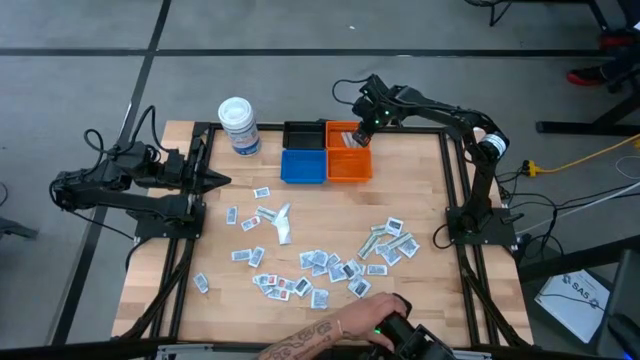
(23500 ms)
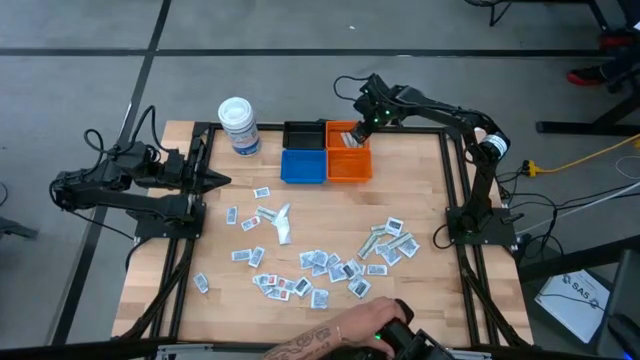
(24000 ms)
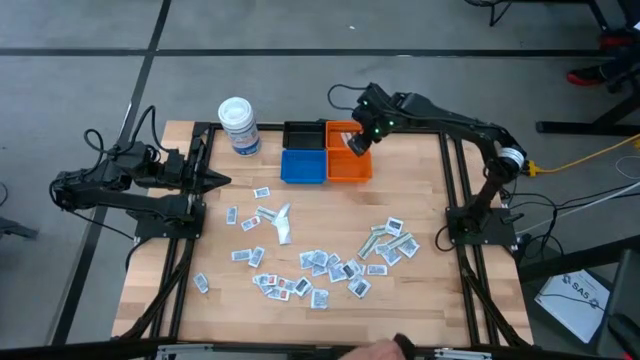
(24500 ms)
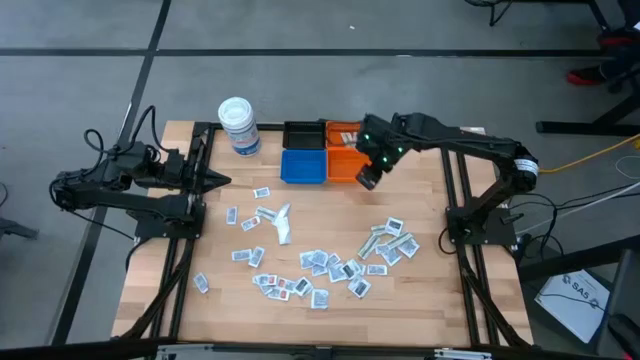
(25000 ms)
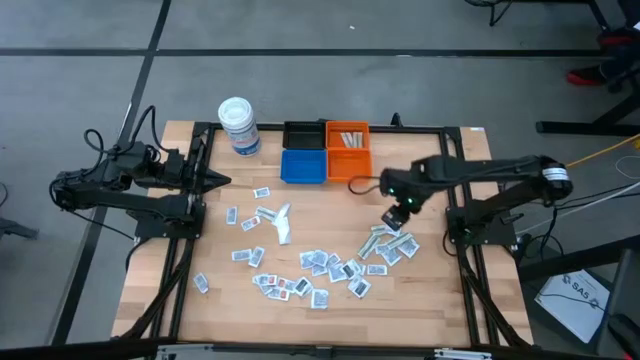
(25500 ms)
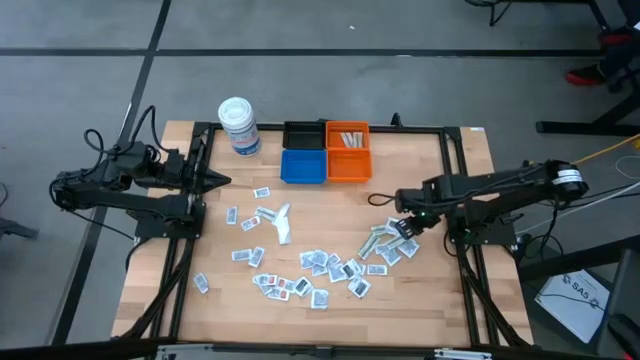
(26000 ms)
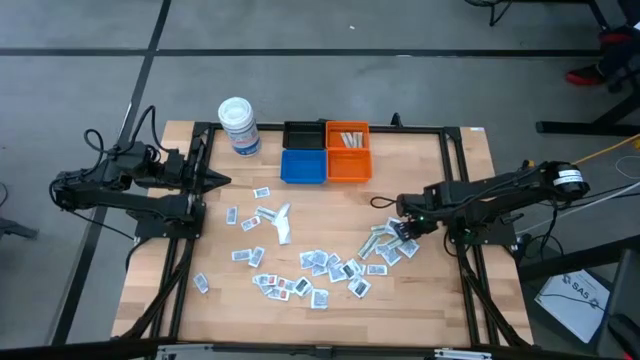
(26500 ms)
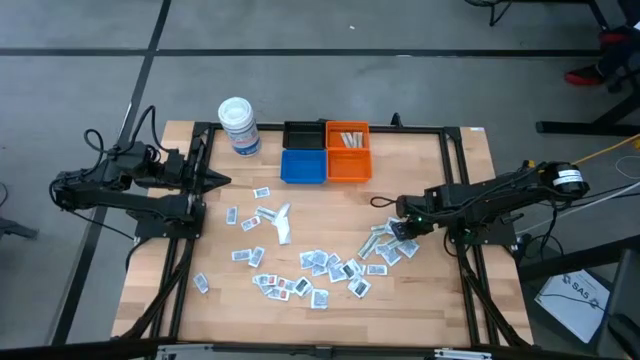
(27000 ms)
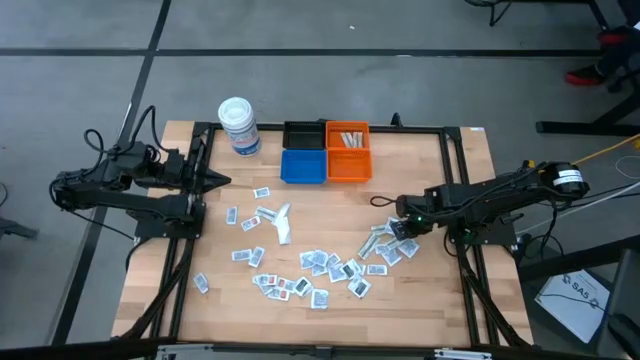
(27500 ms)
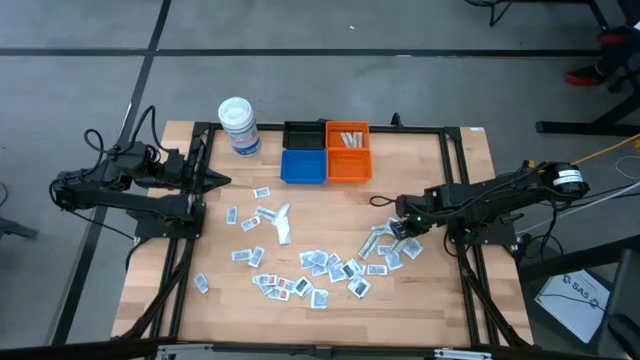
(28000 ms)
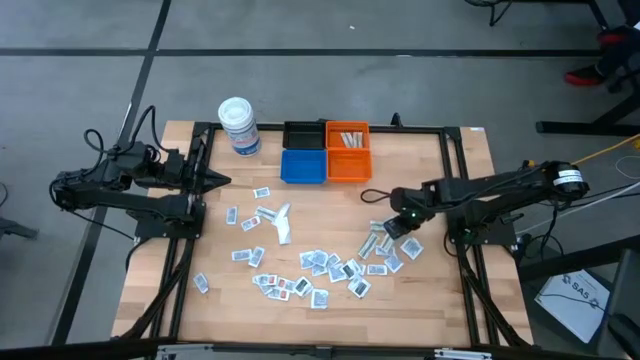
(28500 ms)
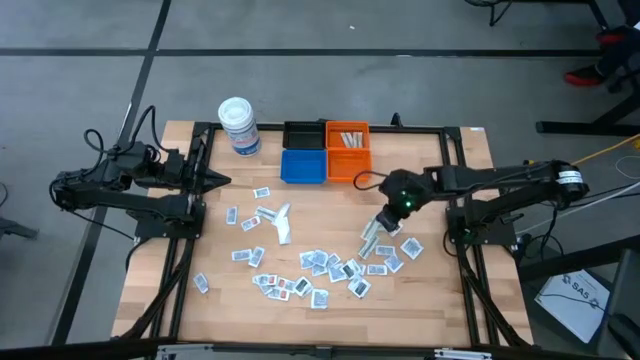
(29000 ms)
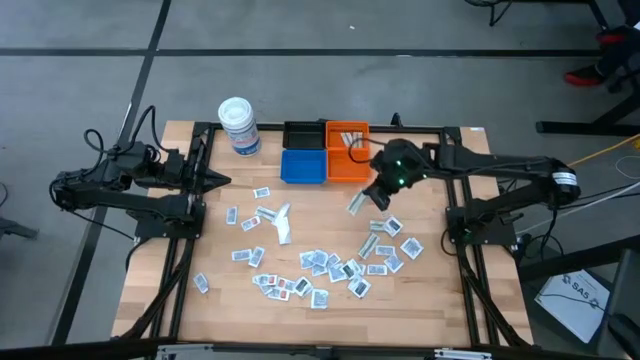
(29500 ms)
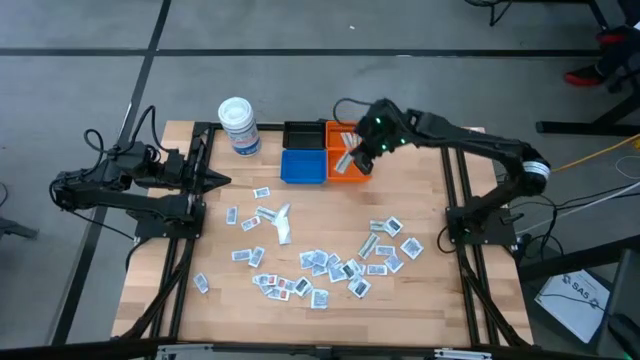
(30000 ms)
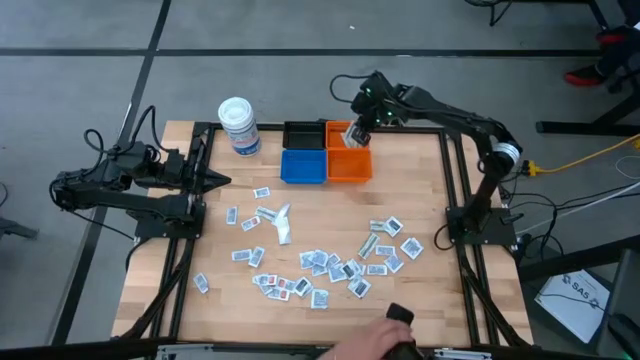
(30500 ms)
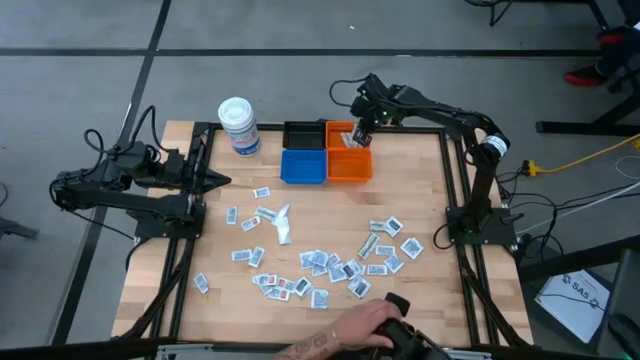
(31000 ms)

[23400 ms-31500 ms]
Task: Pick & Place First Aid Supplies
Put the bandage pack into the top orange bin

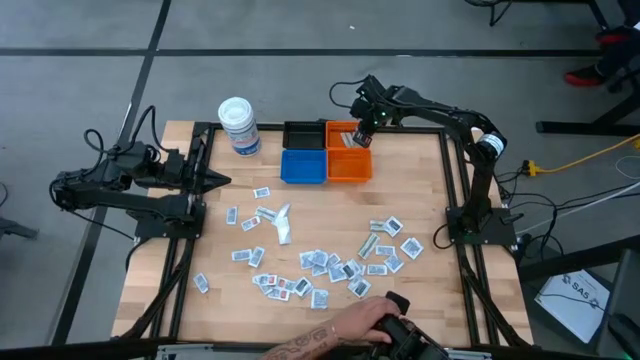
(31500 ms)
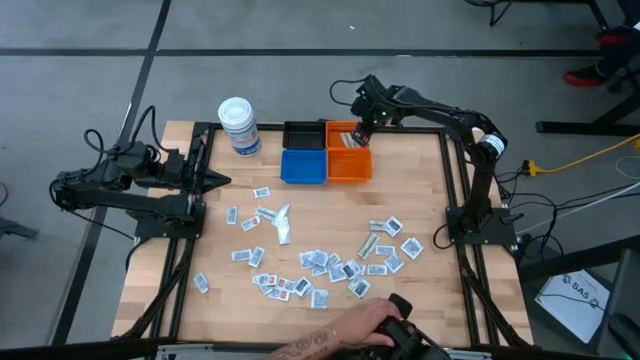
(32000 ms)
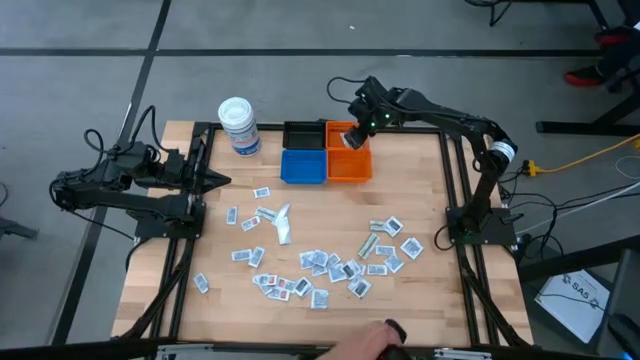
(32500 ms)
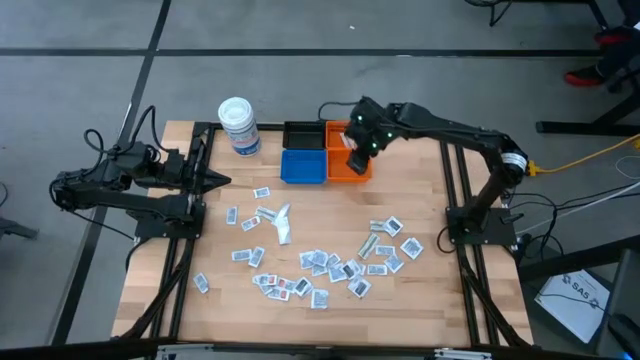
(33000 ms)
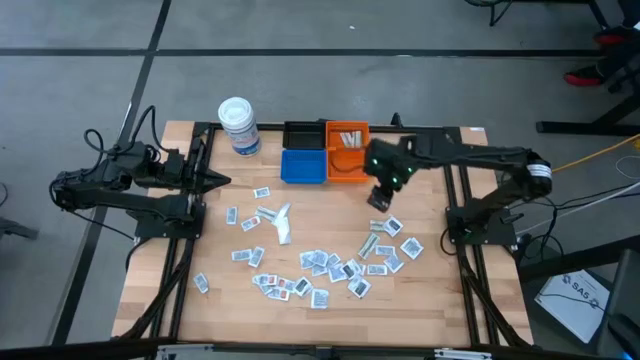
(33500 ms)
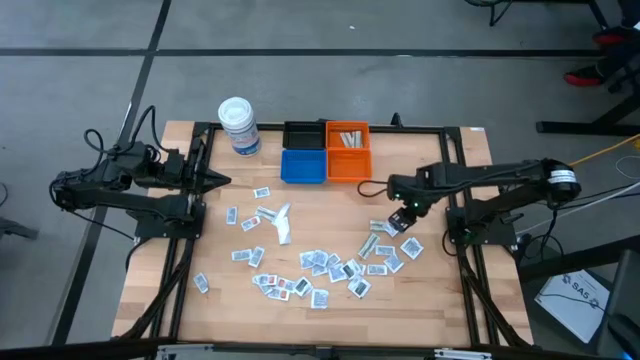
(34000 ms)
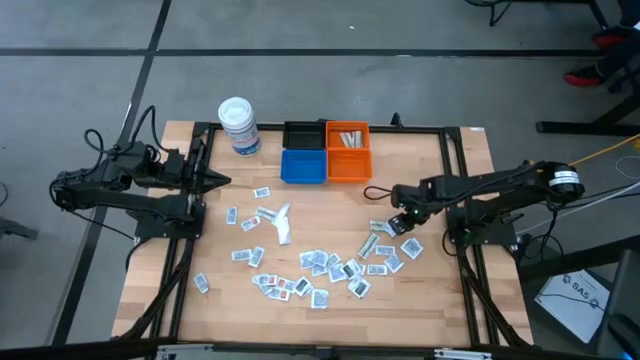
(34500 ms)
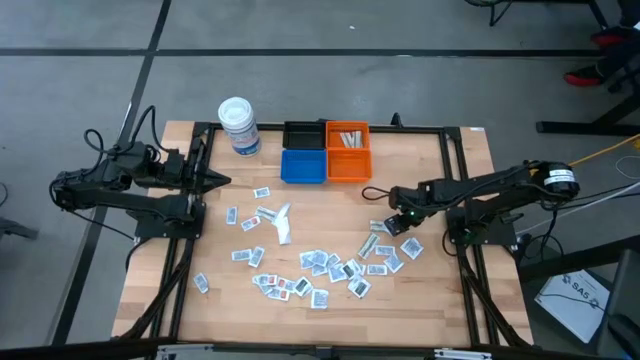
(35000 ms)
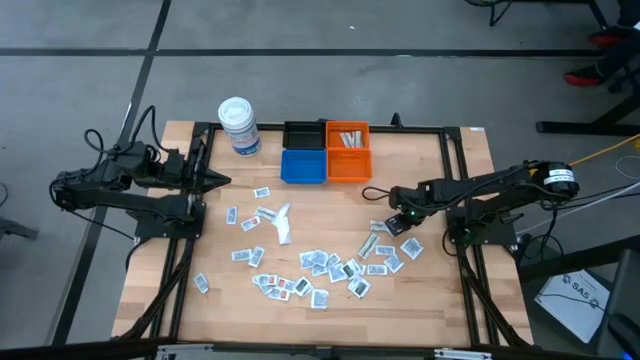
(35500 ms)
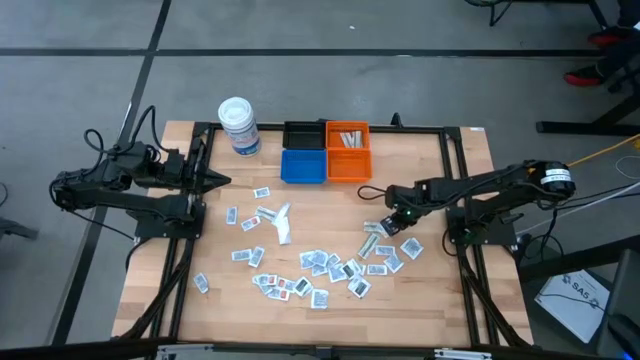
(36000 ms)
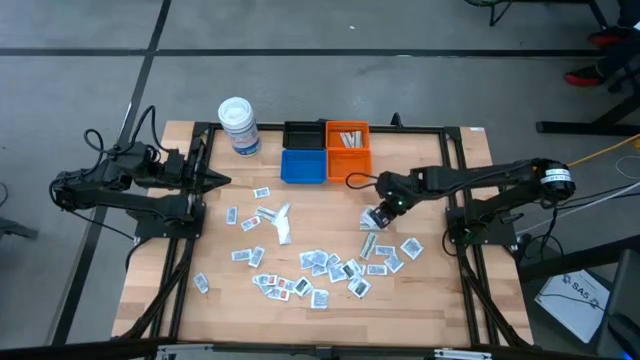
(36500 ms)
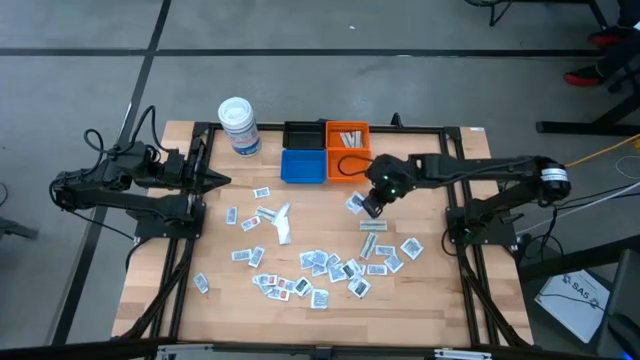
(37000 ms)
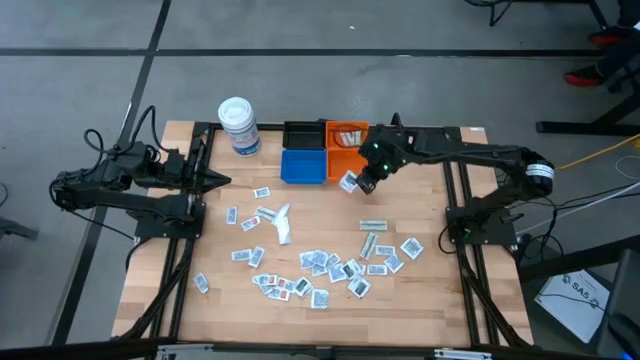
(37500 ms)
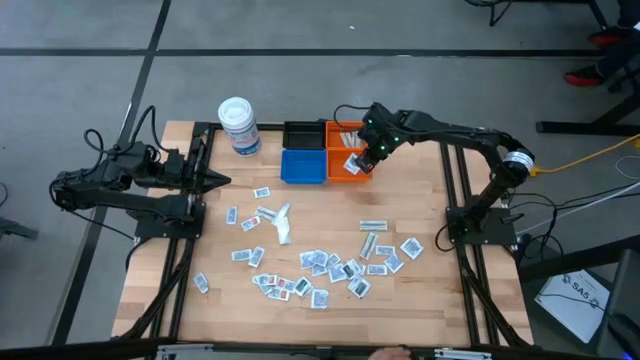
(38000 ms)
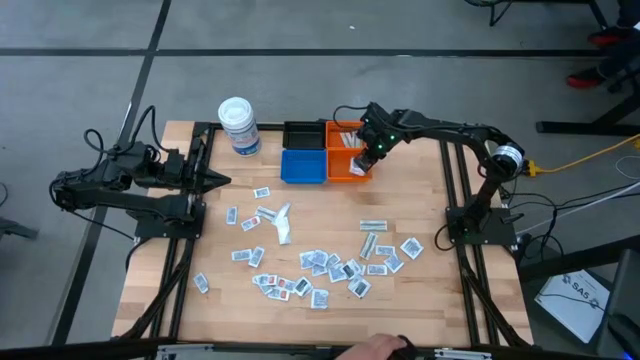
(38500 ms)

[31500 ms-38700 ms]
Put the towelette pack into the bottom orange bin

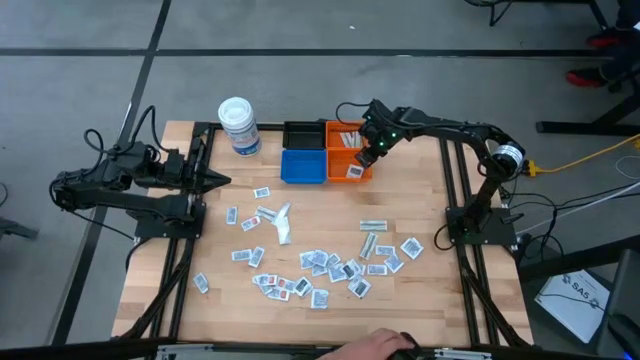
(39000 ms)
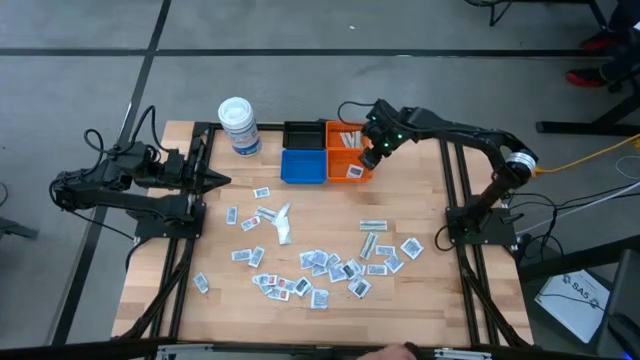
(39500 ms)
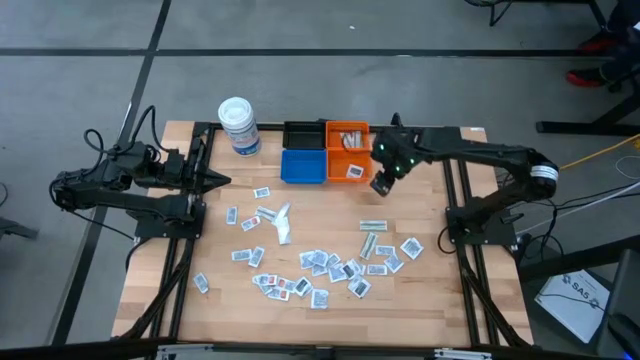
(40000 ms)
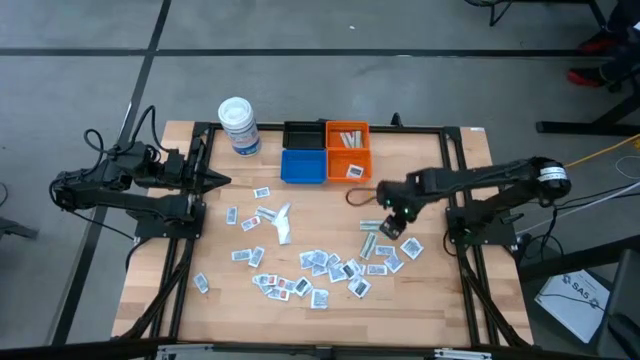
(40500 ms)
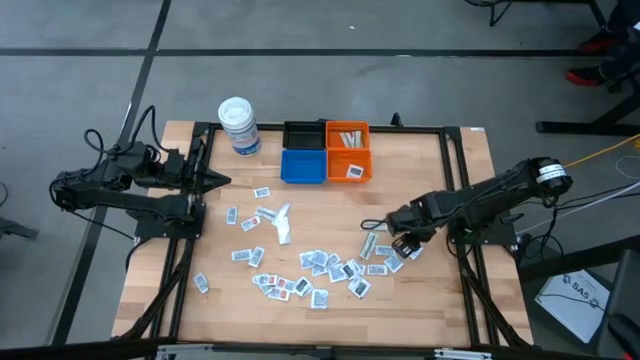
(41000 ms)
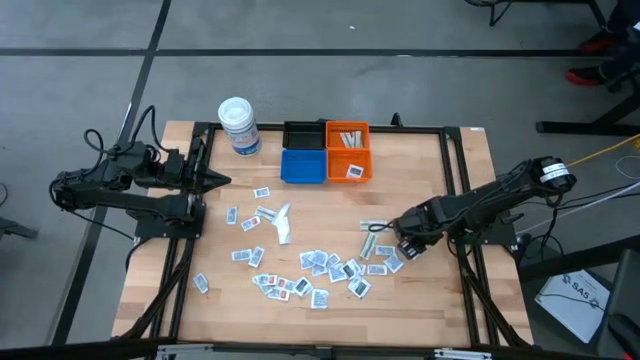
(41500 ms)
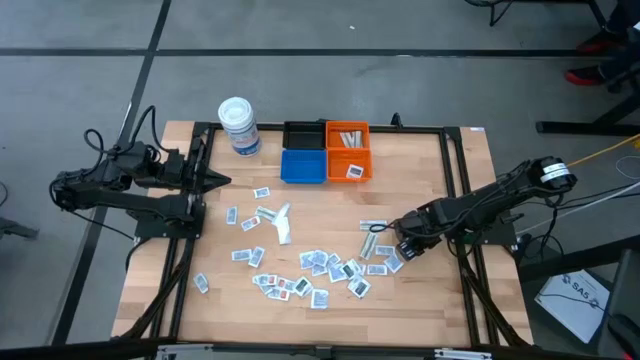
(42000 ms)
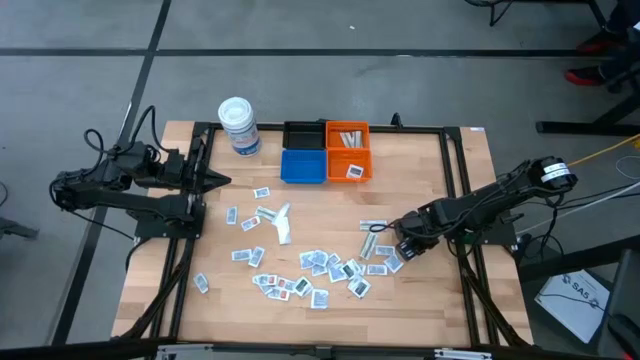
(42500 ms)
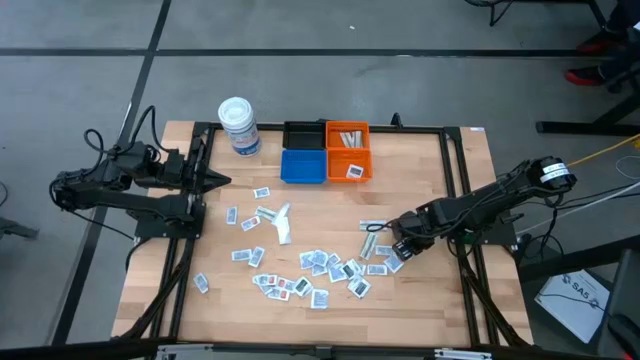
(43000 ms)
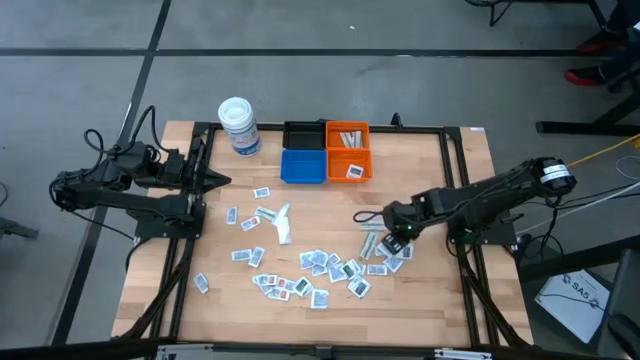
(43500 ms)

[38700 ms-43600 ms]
Put the towelette pack into the bottom orange bin

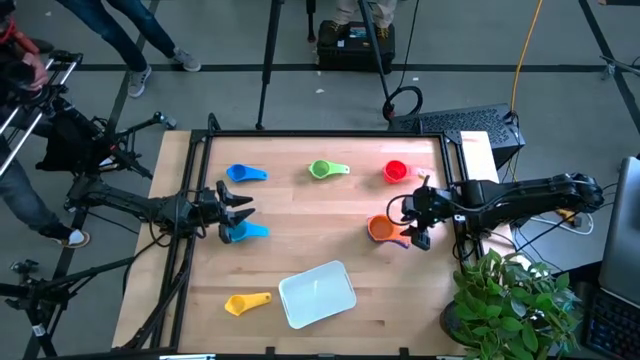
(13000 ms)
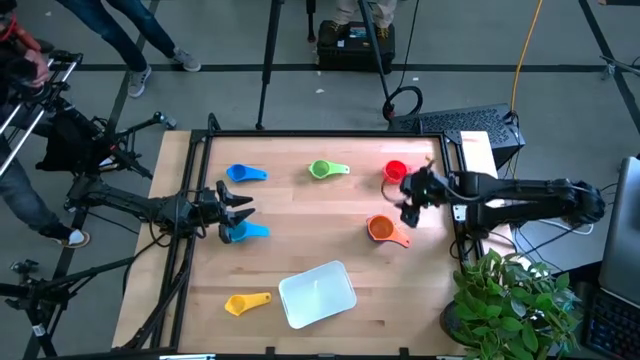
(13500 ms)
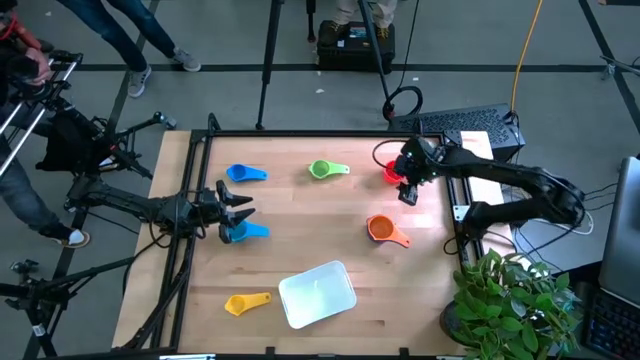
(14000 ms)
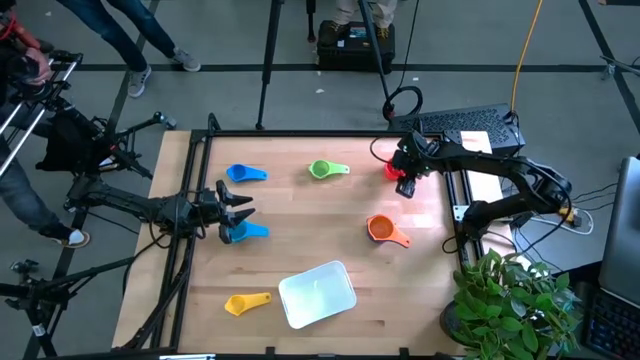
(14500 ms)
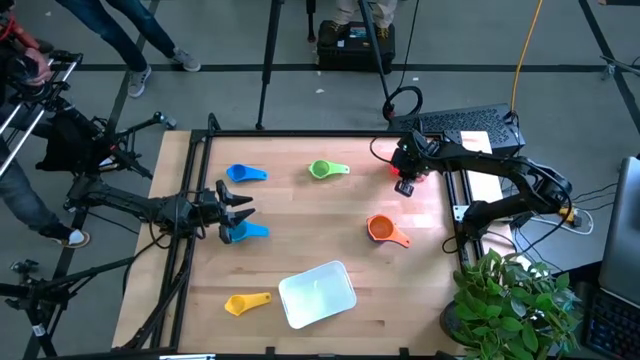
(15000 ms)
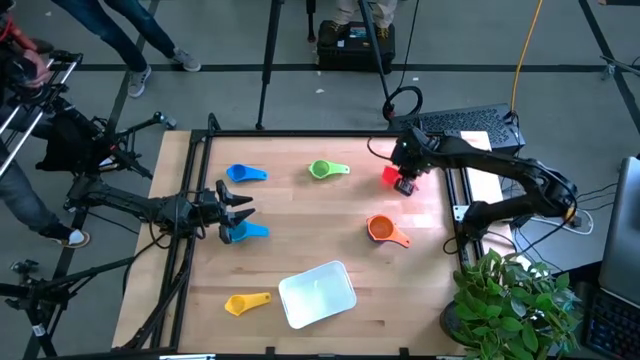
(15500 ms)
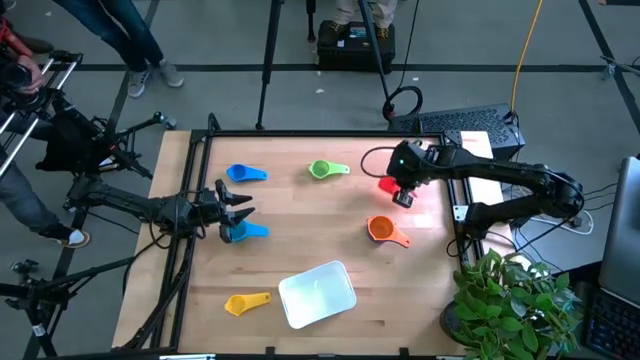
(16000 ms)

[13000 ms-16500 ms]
Task: Nest measuring cups in basket
Stack the red measuring cup on the orange measuring cup
